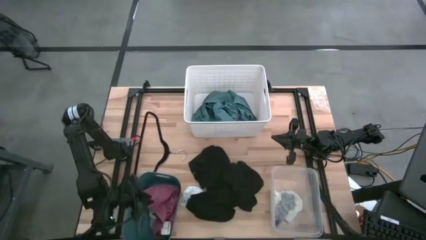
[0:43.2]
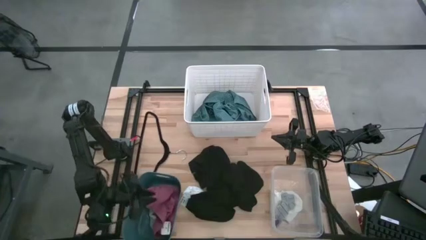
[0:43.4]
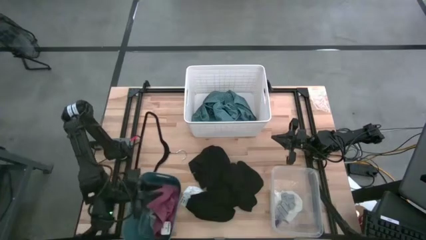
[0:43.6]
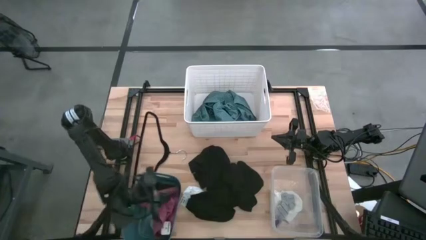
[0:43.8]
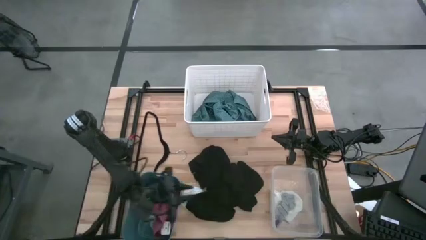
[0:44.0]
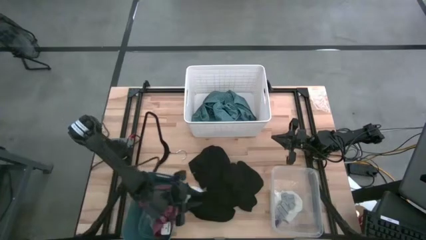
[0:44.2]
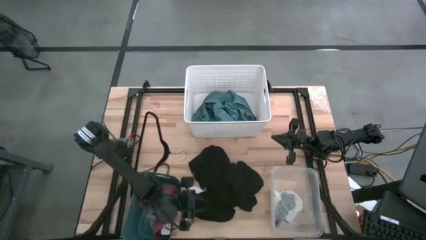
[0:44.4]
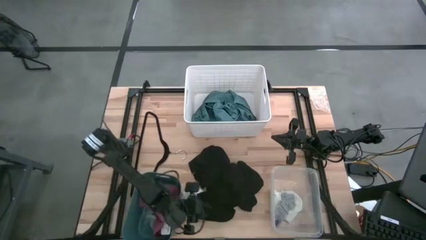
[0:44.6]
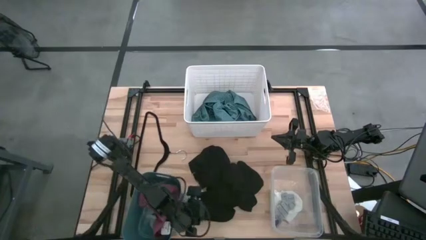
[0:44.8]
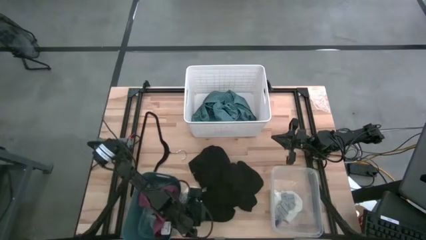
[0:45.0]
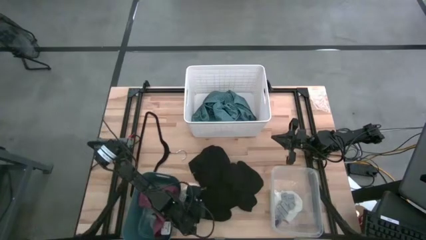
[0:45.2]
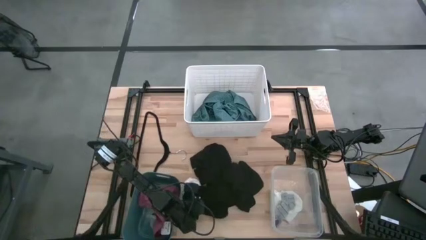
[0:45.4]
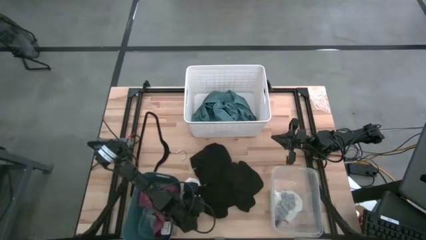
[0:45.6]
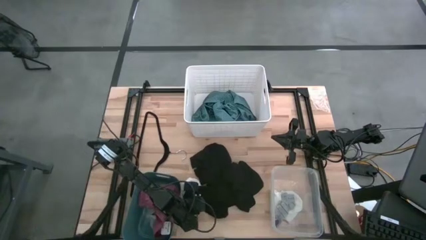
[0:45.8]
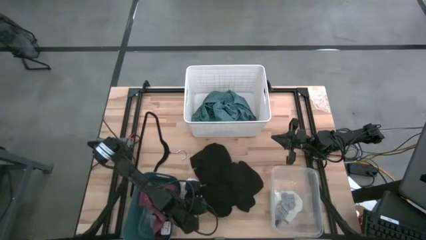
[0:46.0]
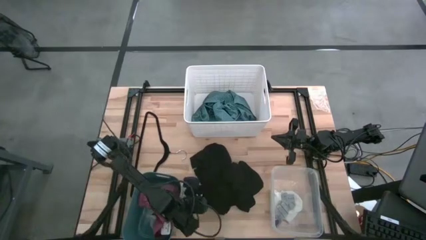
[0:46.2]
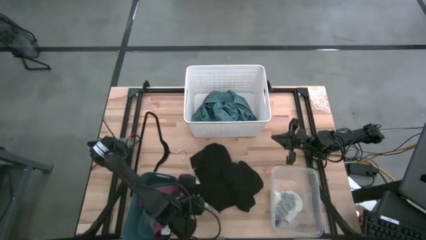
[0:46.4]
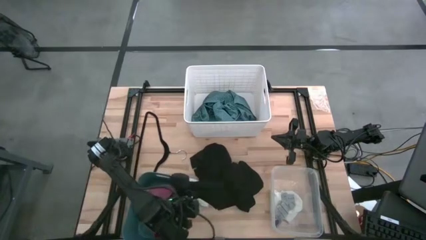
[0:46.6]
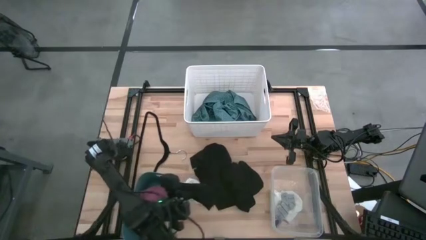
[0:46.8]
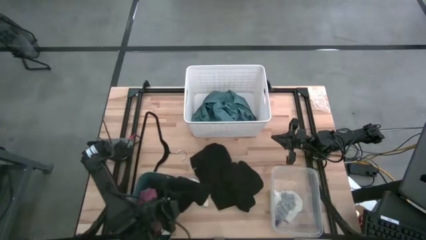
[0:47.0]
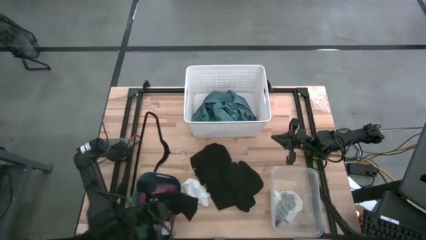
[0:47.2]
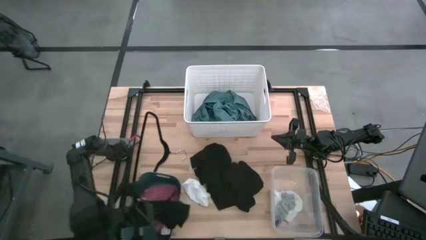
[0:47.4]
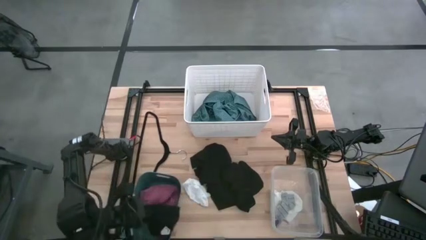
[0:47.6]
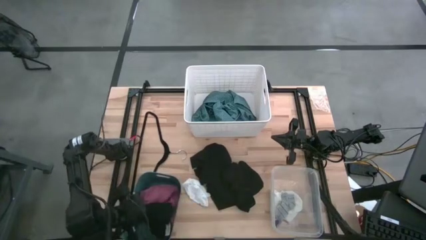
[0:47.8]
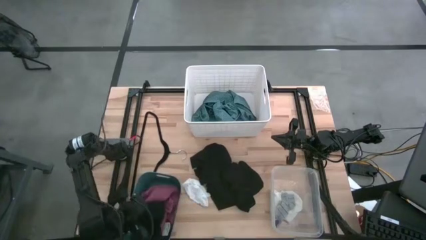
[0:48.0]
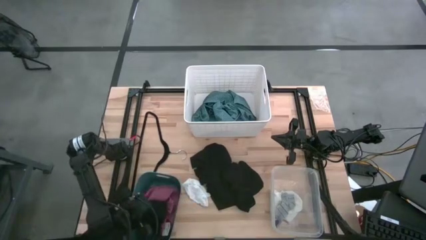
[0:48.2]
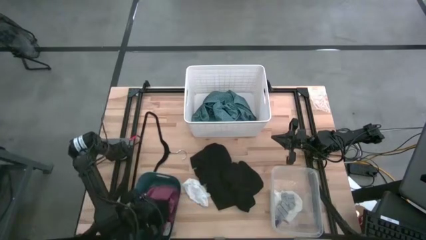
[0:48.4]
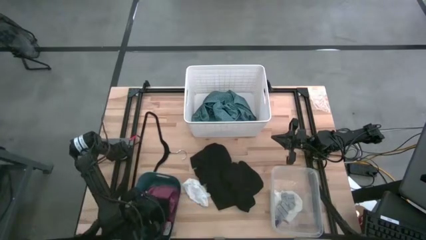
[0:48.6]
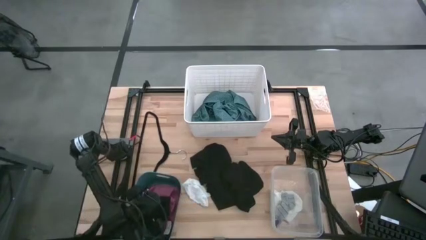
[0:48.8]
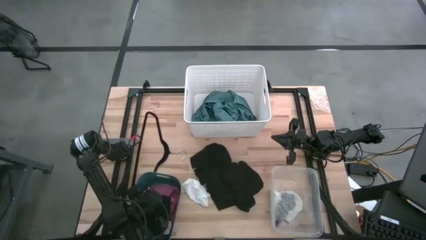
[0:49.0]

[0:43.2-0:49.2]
Task: Pick & Place Cloths
Put the black underwear into the blue bin

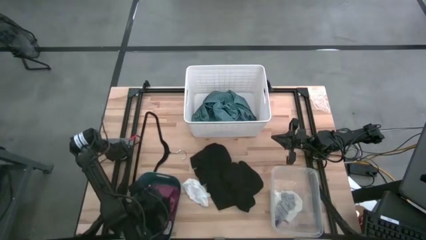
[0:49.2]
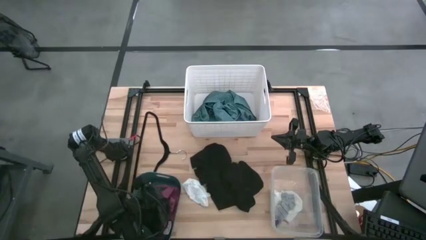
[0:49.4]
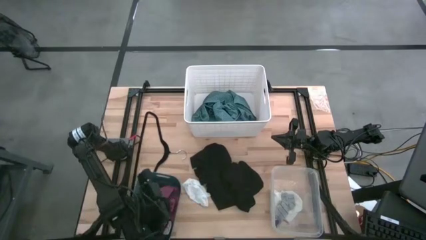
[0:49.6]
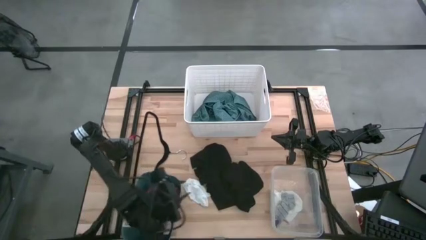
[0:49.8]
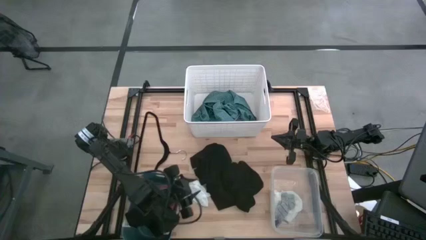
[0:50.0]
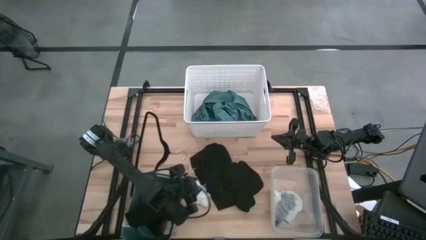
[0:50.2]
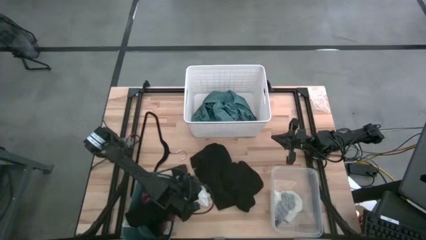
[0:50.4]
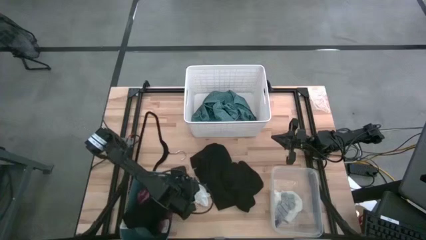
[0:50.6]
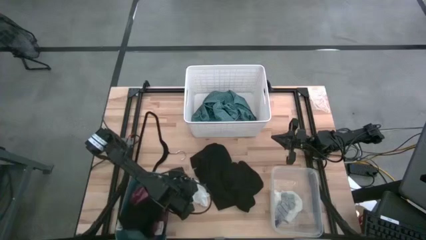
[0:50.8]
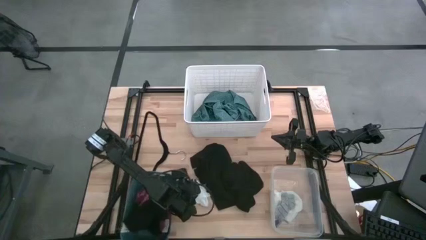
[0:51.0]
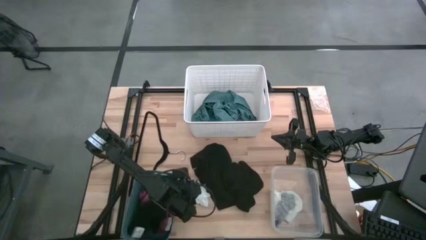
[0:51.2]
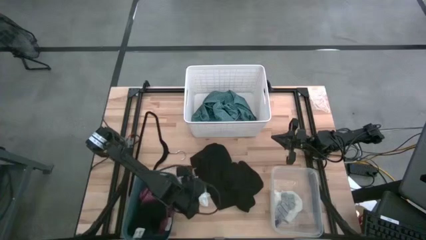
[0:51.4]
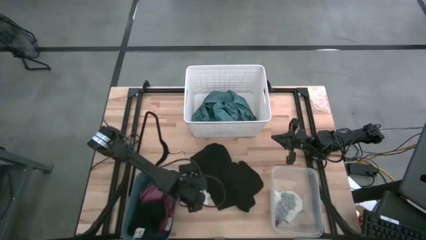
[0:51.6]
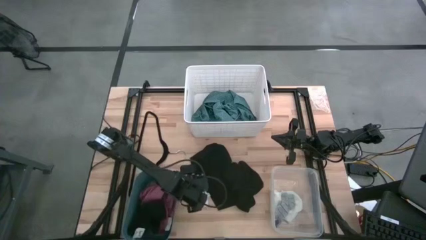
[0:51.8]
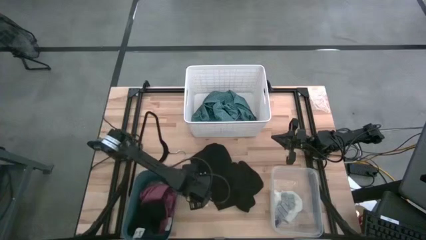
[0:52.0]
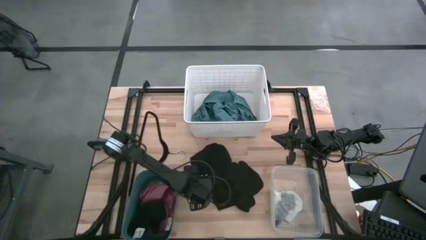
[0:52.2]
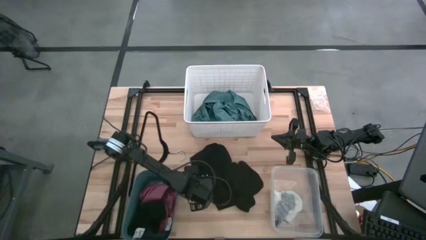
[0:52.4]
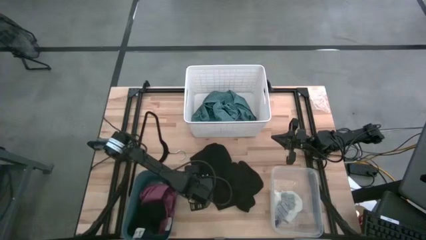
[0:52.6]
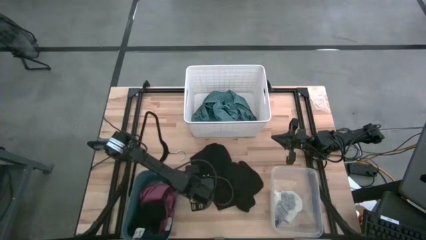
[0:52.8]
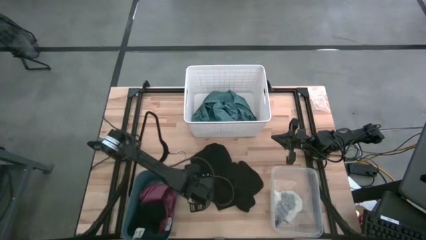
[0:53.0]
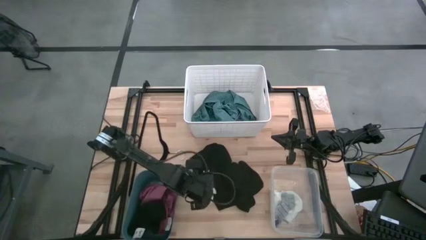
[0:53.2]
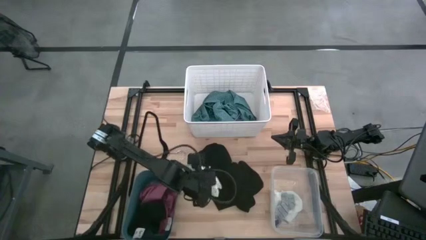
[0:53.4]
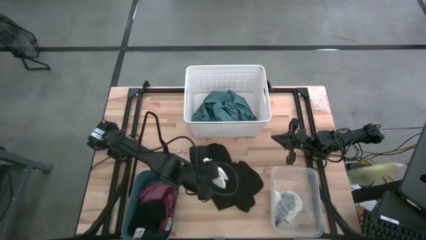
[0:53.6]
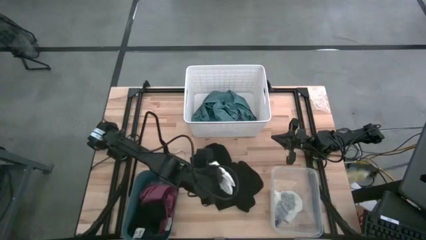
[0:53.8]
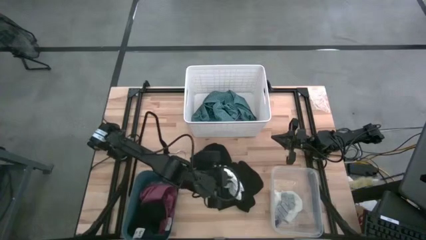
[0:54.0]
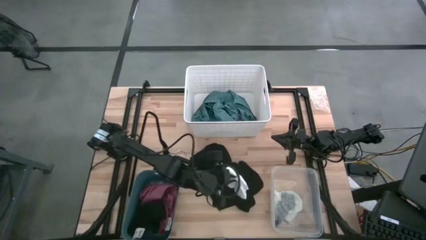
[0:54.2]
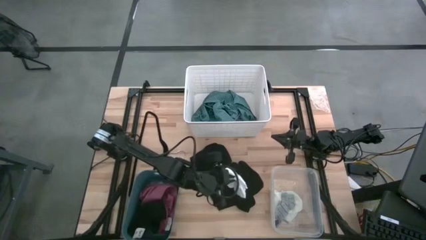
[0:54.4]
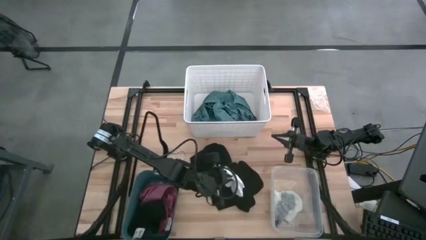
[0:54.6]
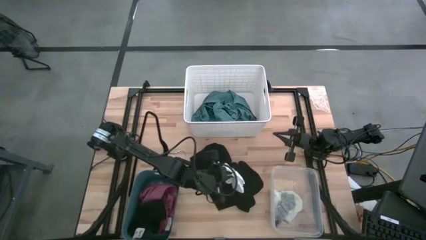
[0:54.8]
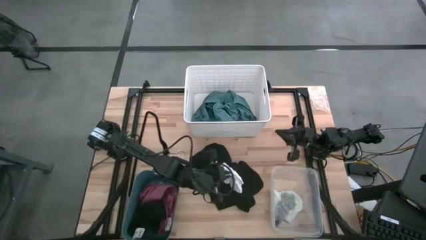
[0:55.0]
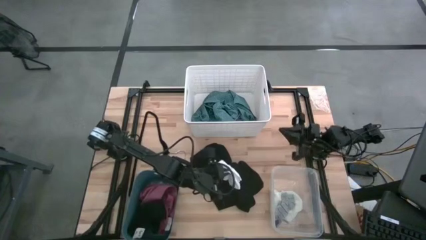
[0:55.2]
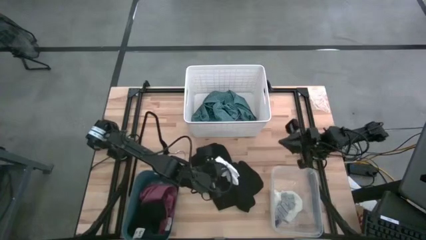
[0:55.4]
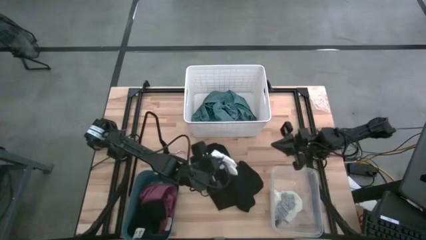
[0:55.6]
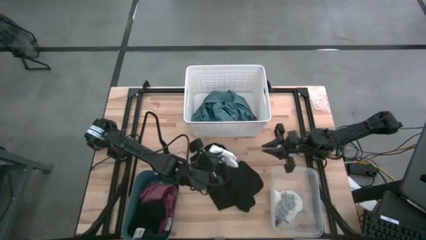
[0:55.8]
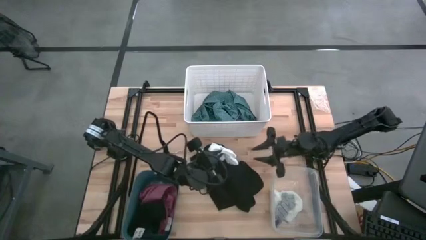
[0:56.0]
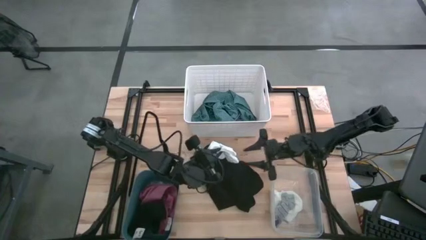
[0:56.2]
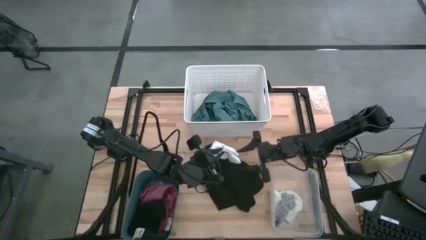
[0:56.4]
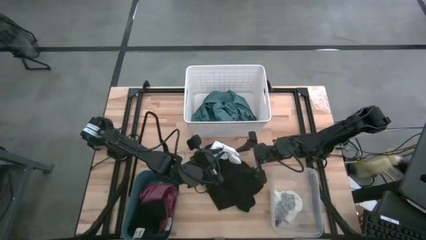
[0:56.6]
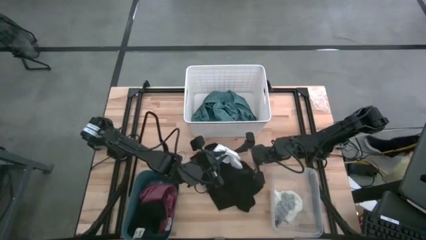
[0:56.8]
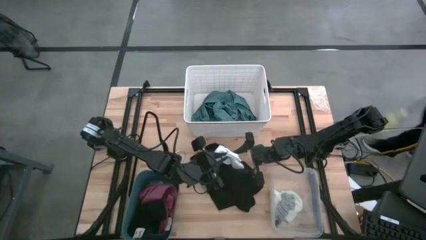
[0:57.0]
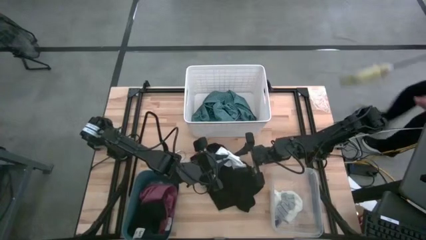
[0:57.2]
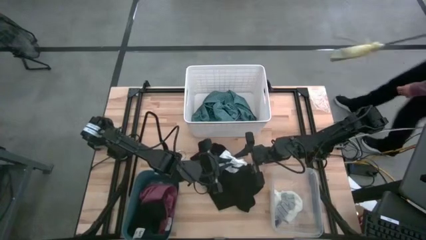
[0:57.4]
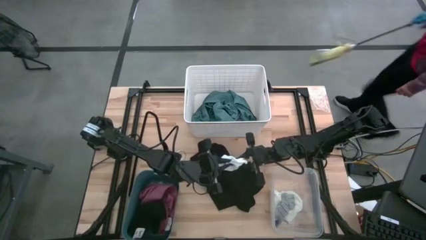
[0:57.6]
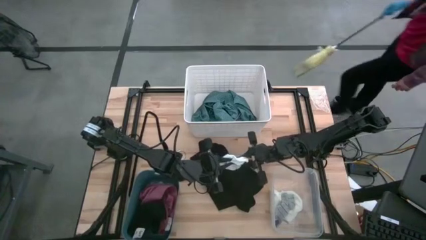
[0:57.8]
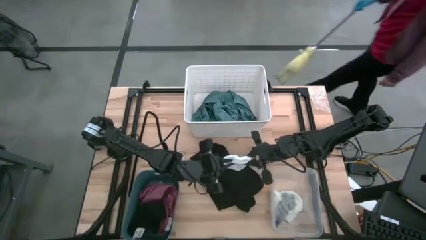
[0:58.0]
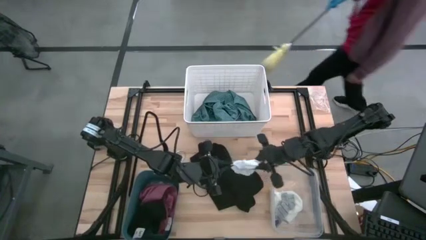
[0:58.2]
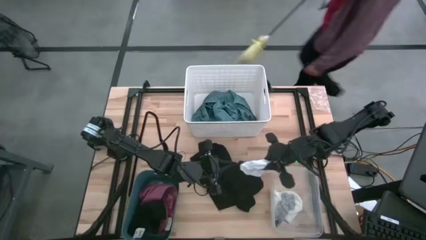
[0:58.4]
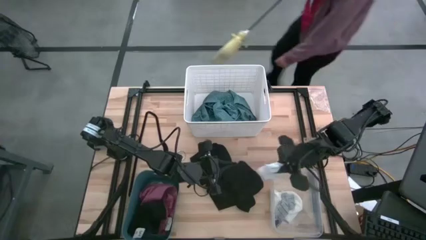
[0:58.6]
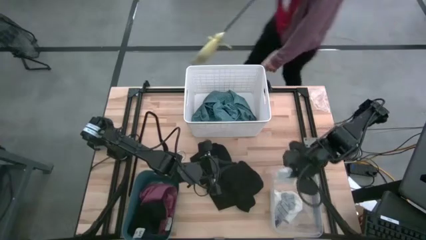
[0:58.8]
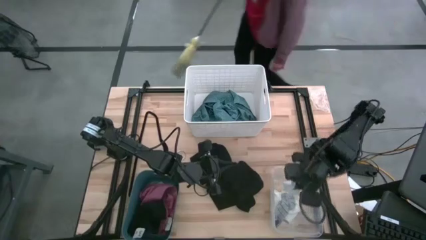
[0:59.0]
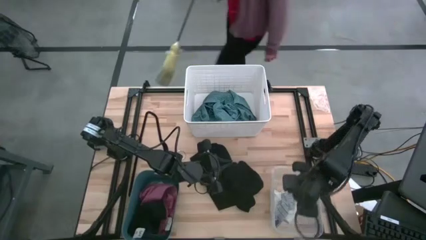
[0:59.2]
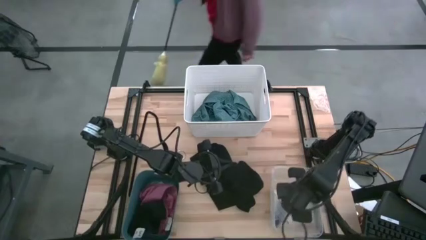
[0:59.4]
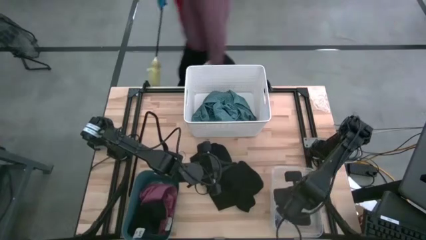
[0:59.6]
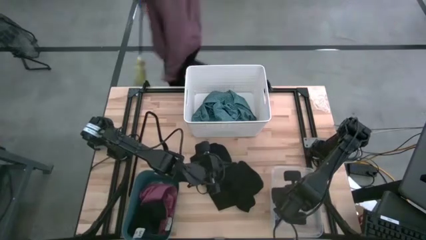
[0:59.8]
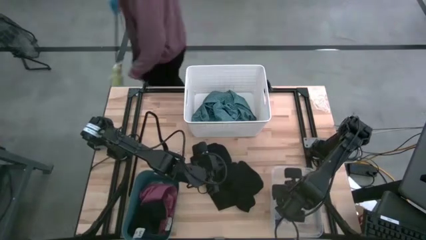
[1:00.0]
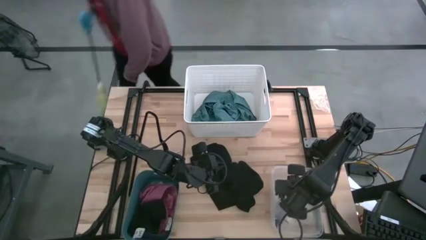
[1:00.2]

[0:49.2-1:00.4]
Put the white sock into the transparent container
